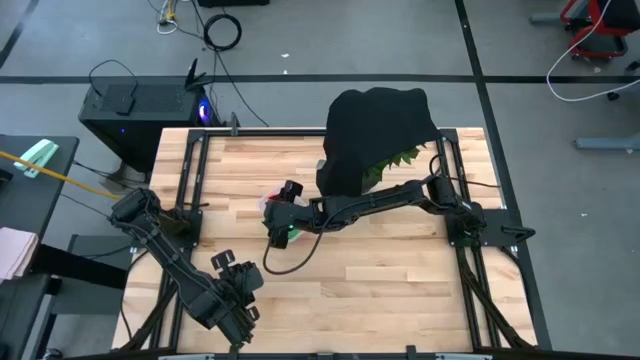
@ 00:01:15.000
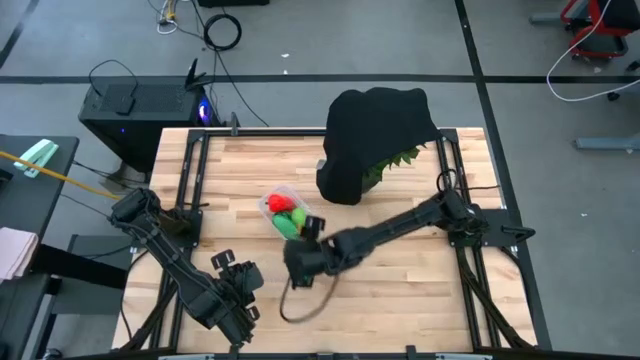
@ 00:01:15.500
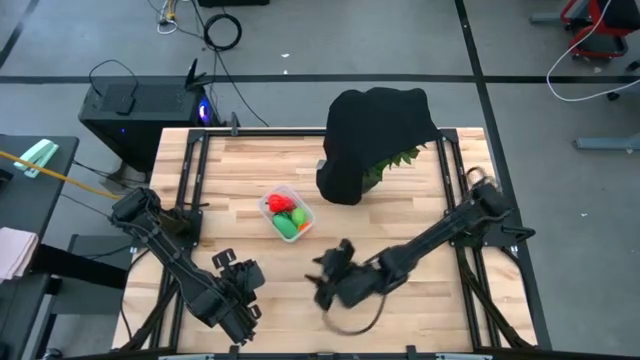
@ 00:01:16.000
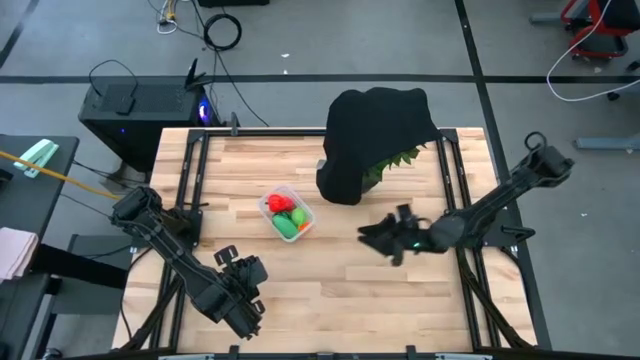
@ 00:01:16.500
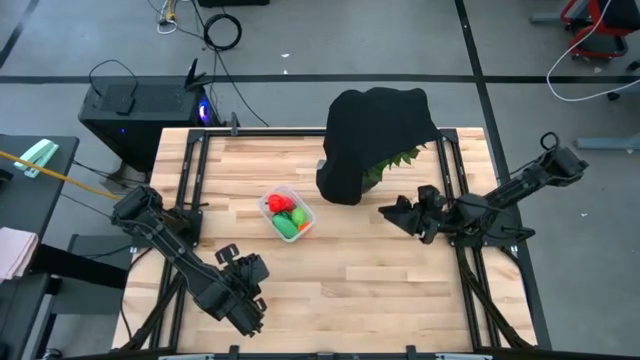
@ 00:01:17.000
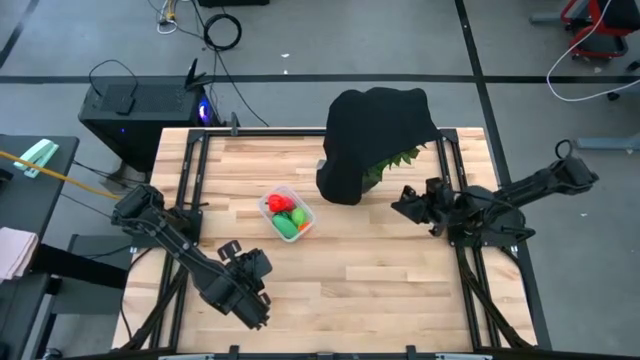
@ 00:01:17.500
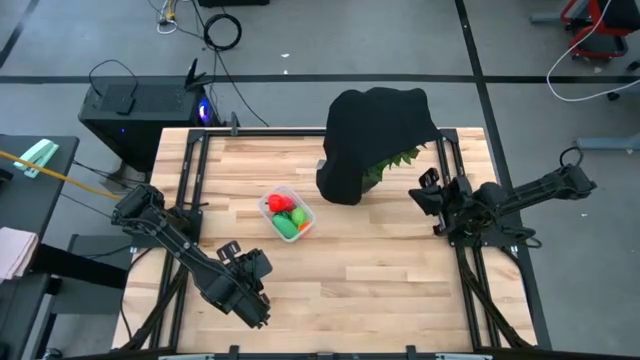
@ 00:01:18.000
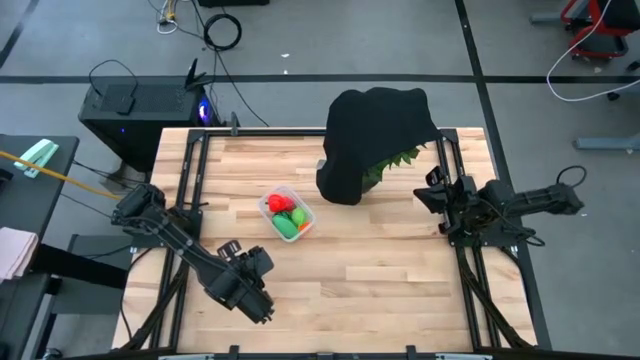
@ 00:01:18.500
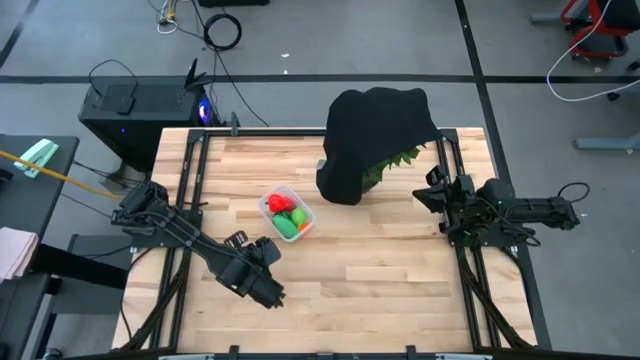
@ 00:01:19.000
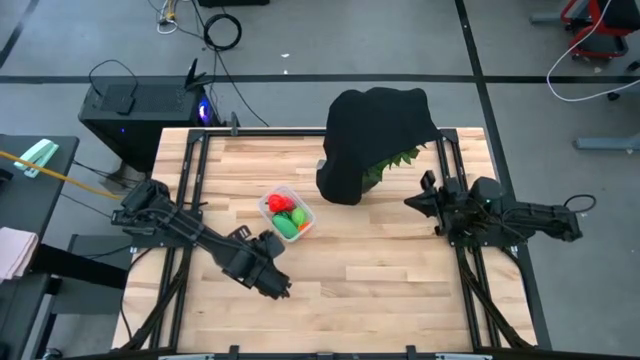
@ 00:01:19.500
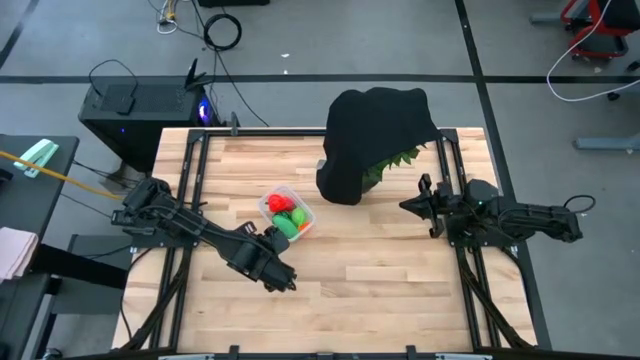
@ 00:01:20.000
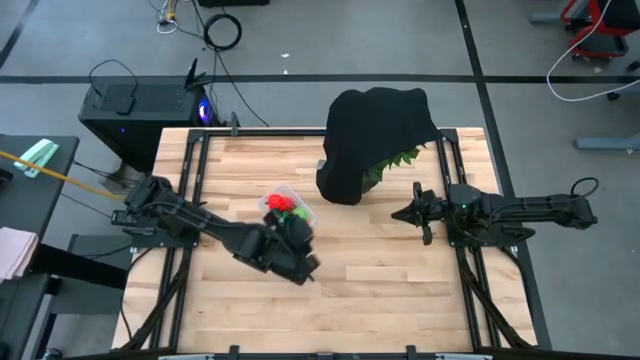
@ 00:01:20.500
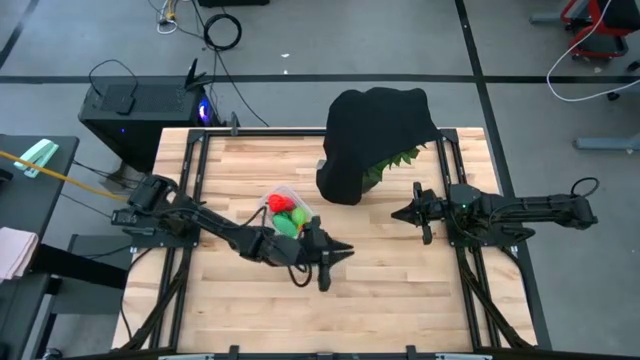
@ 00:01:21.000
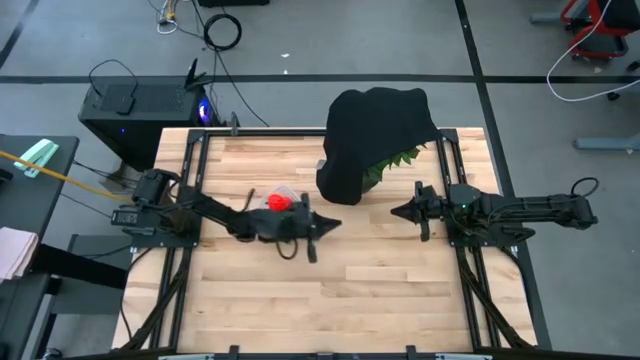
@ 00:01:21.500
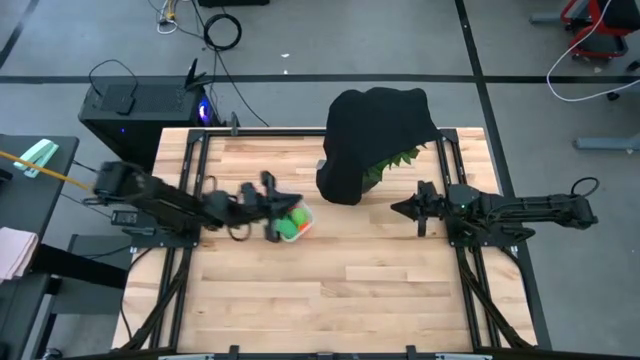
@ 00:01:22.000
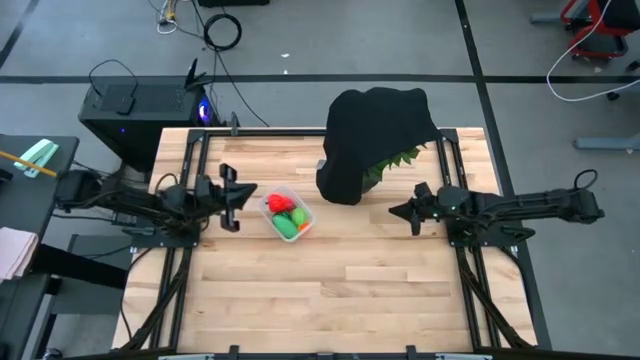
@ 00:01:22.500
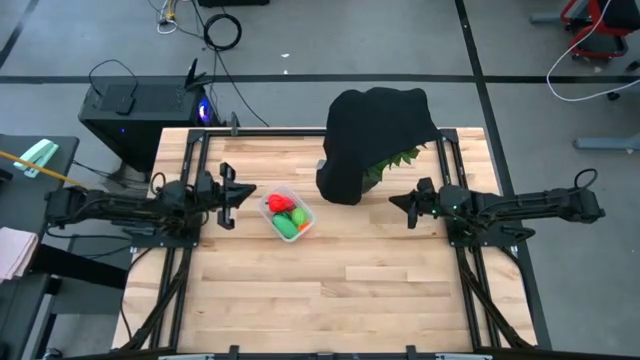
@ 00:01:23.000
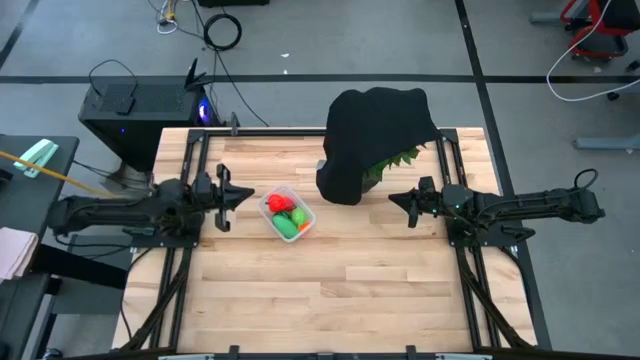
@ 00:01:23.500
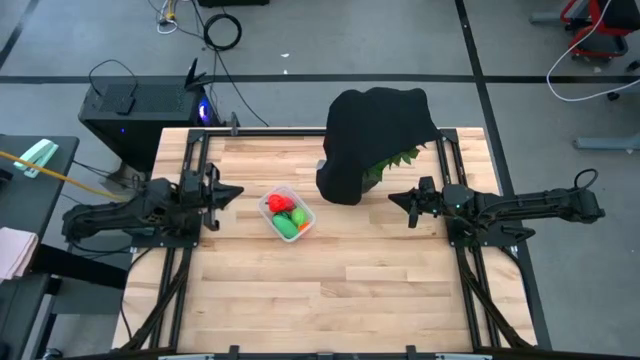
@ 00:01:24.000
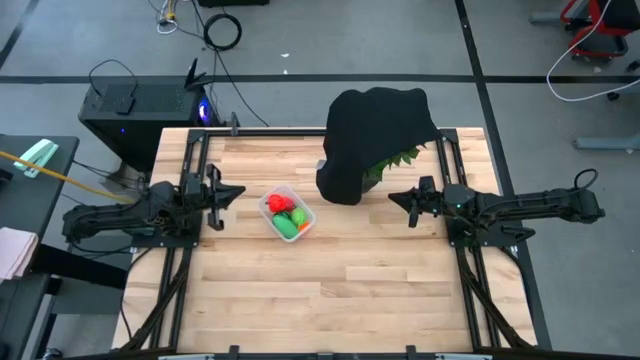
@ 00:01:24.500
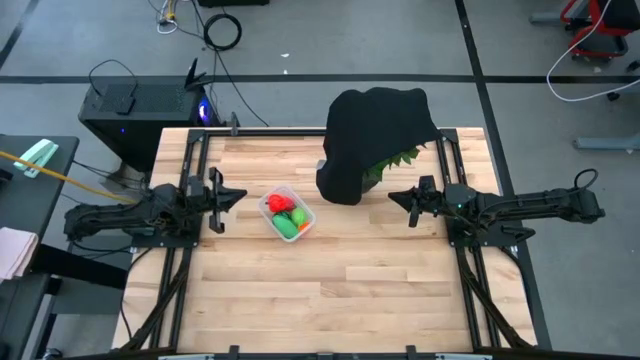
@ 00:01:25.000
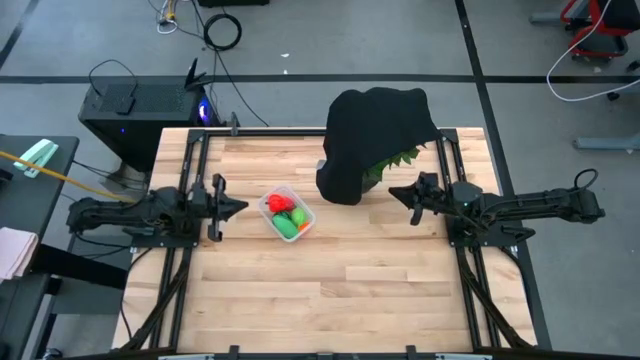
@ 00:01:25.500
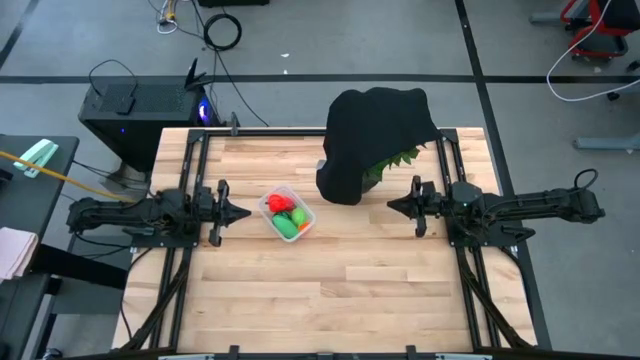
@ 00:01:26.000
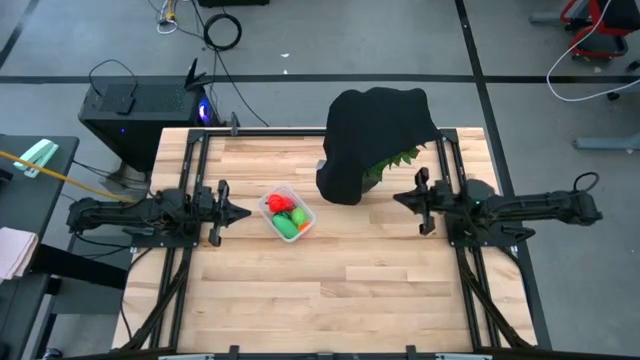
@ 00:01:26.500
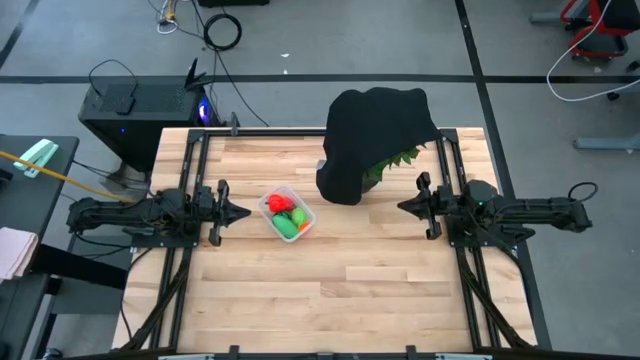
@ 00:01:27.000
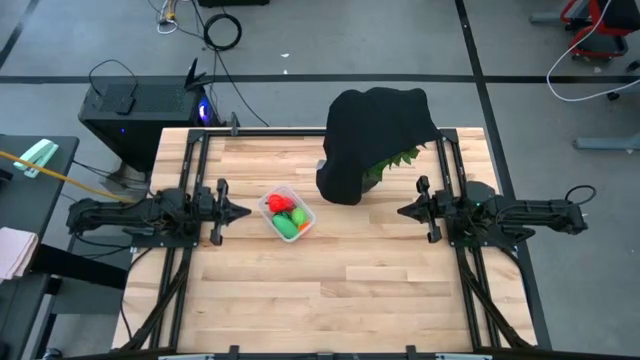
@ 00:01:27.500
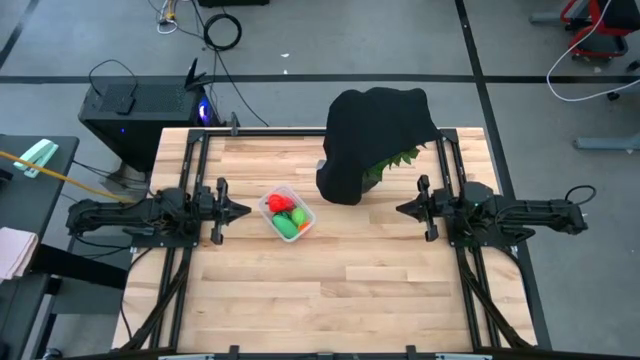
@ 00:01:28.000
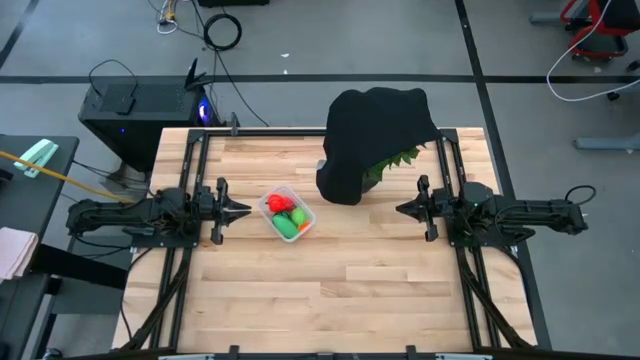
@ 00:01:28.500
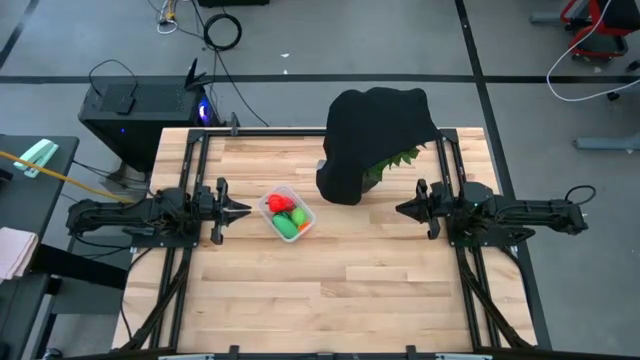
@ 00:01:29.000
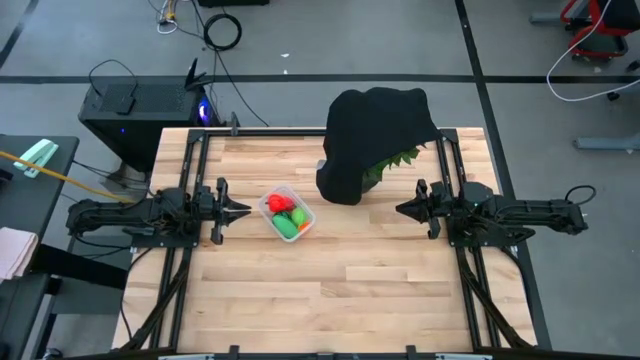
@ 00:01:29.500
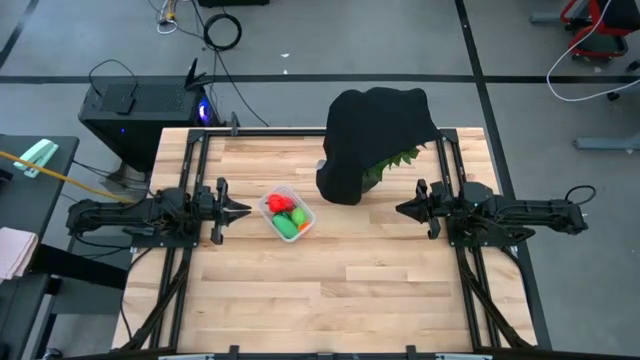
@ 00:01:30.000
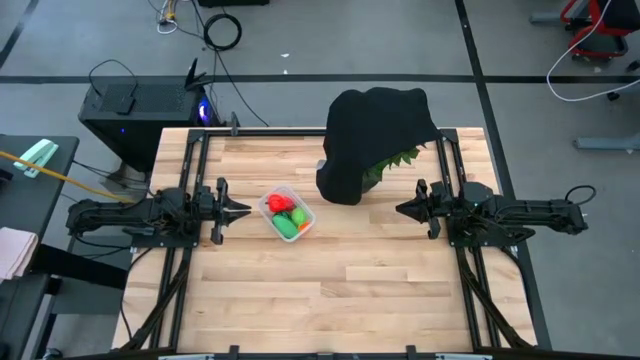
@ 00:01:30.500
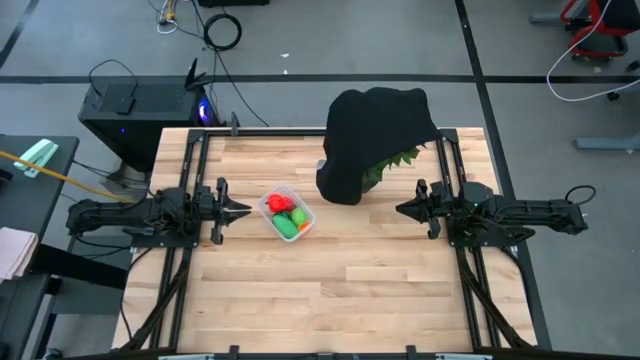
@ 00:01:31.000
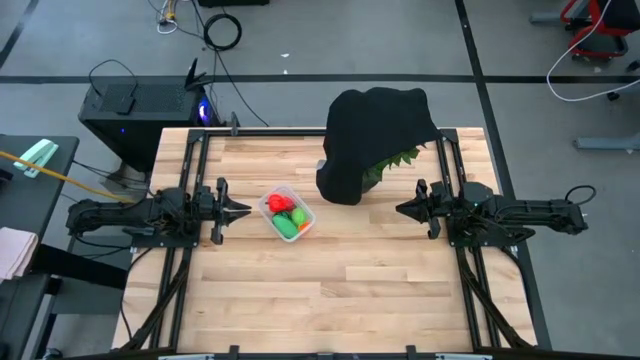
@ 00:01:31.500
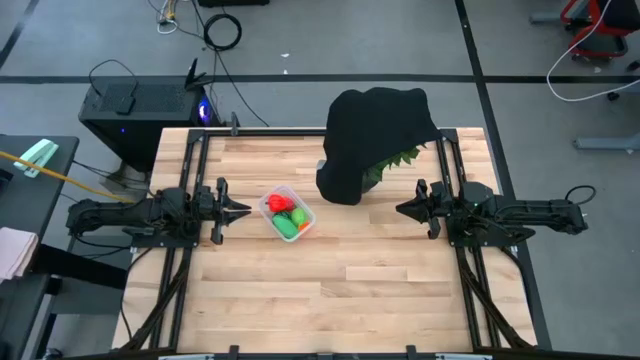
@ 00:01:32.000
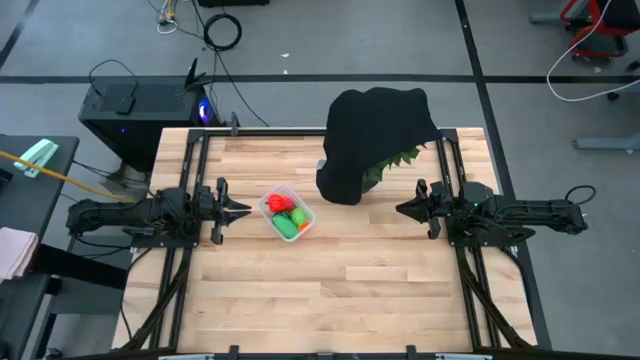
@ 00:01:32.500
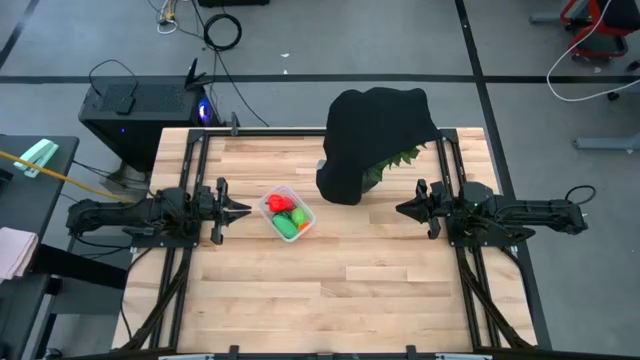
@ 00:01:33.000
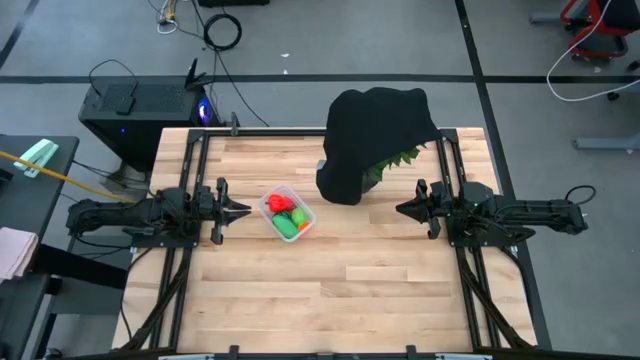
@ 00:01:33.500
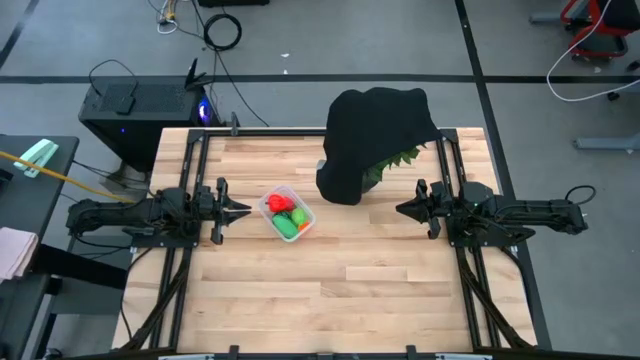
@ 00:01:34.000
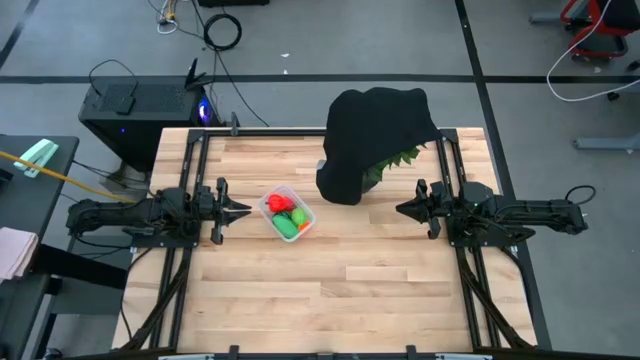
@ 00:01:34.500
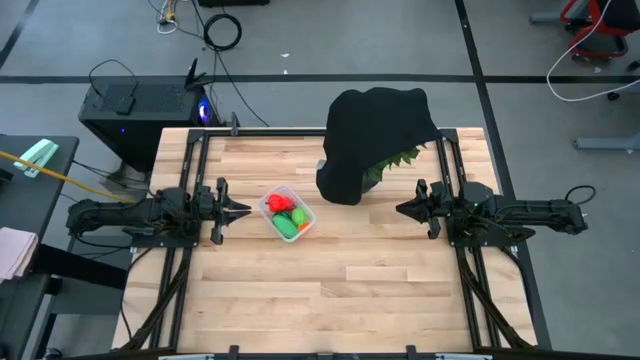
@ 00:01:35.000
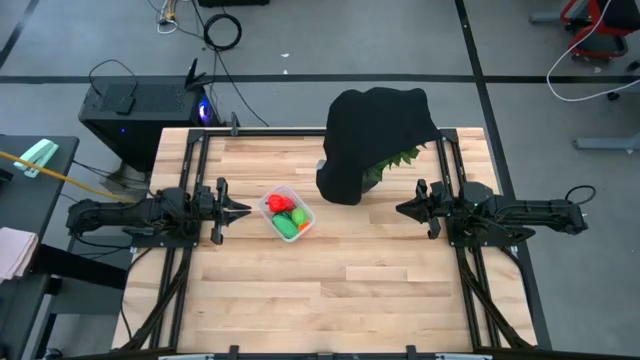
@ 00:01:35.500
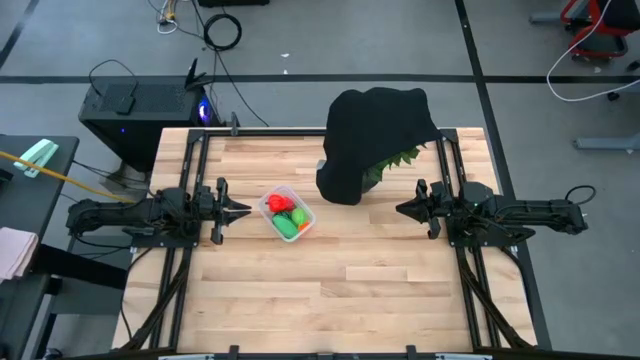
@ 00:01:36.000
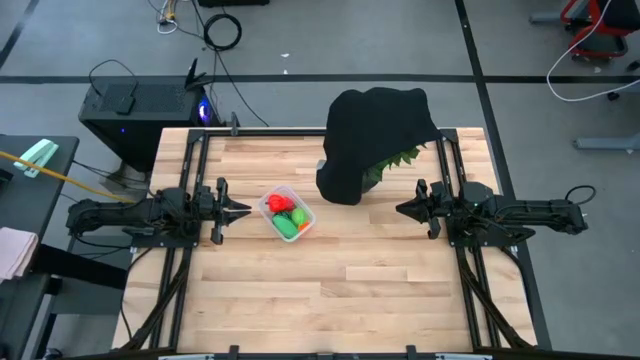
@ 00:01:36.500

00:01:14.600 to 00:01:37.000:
Task: Pick and placing Produce into tupperware
Return to Home Position
